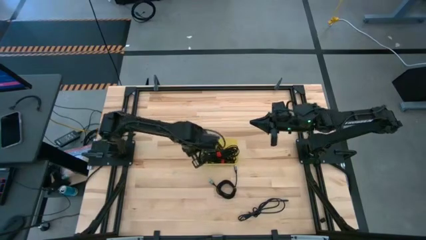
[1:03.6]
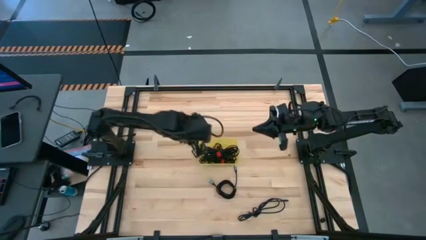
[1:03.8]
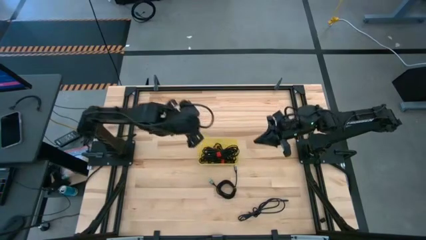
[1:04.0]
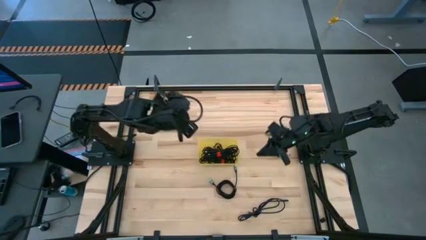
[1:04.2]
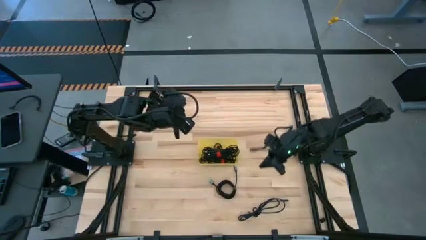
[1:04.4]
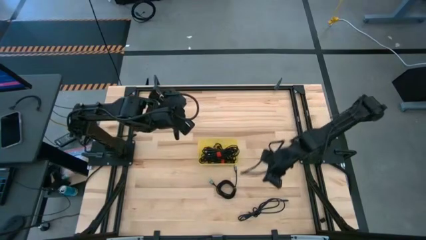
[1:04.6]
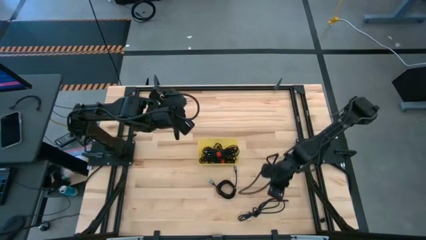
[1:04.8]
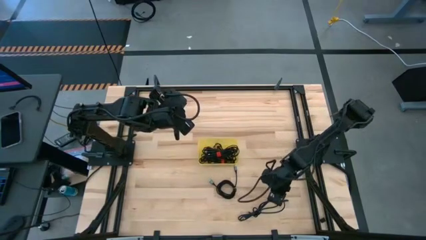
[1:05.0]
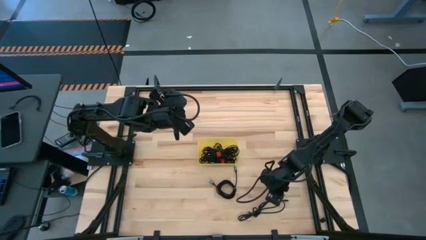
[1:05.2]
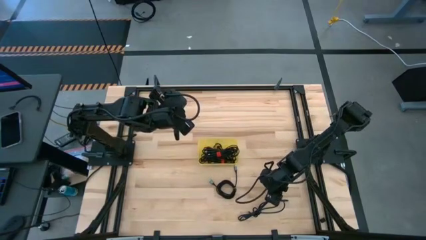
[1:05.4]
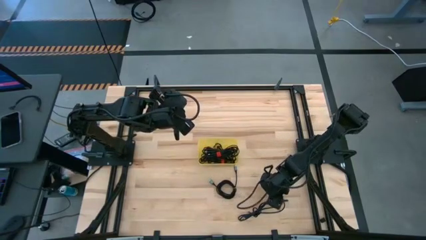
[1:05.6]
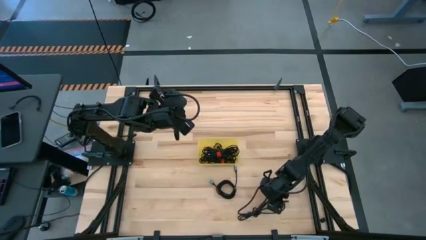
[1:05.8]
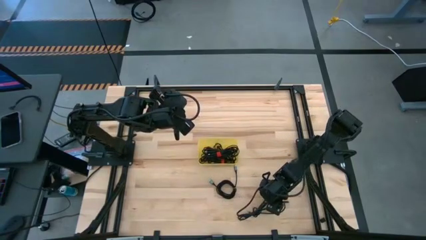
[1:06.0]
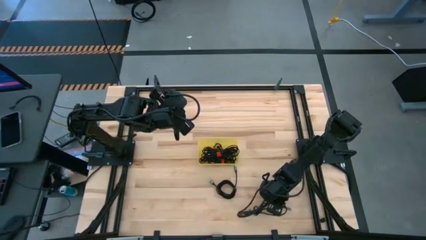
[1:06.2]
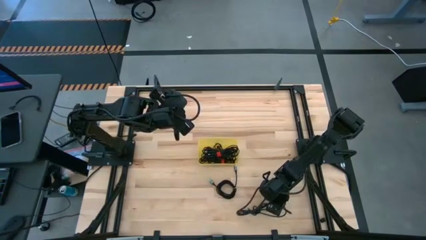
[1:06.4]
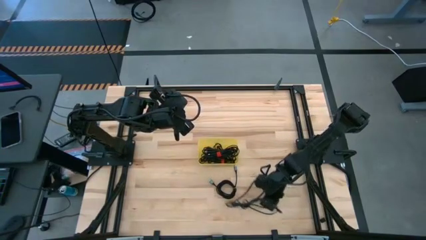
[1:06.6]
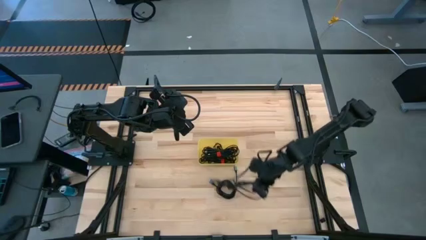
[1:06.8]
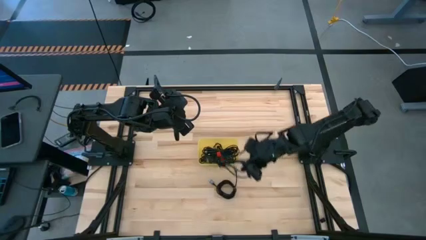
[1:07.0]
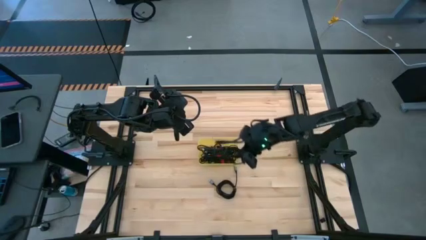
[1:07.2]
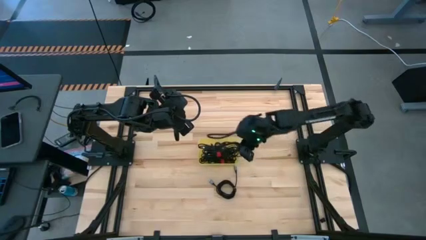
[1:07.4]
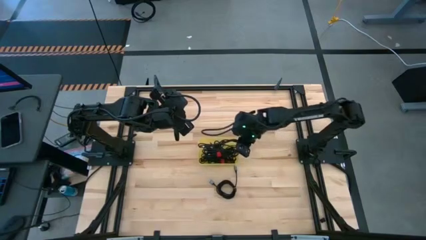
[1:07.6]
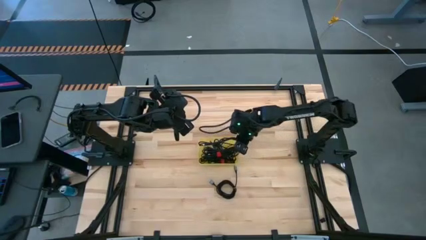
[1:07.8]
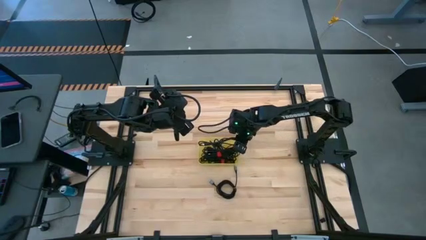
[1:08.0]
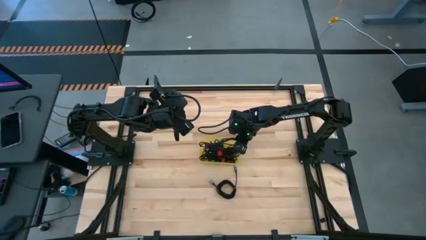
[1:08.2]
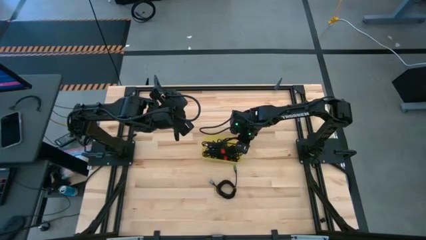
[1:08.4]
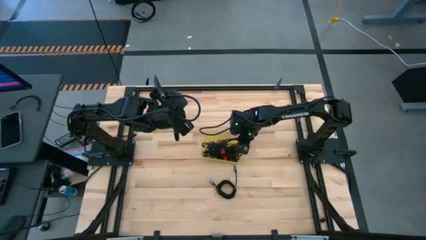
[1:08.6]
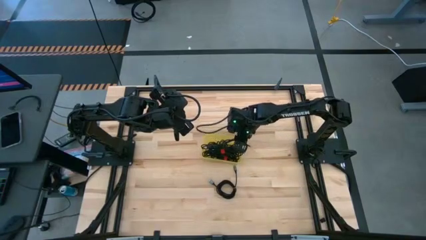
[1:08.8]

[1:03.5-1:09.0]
Task: Pick and place USB-C Cables
Put the black charger cable into the yellow bin

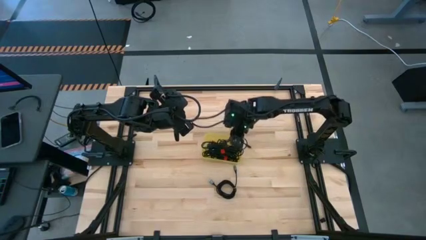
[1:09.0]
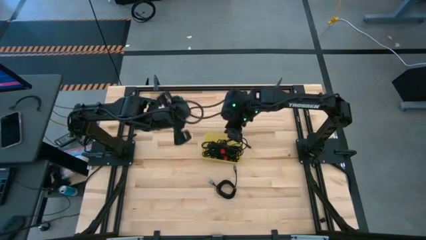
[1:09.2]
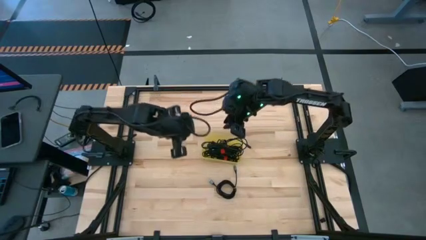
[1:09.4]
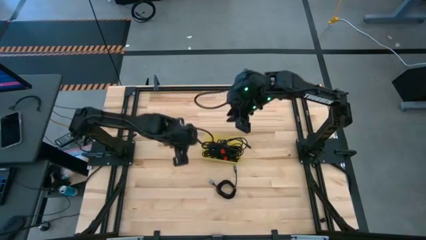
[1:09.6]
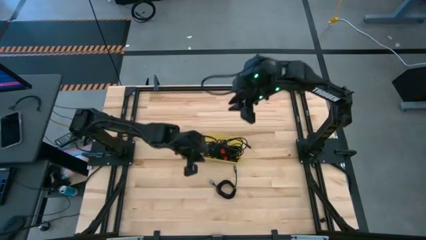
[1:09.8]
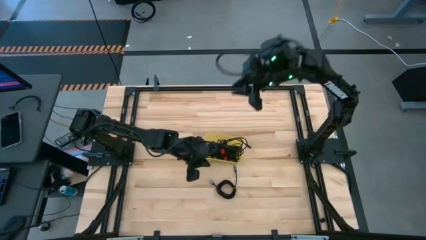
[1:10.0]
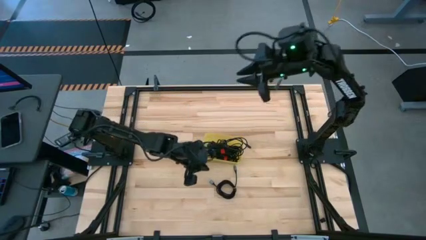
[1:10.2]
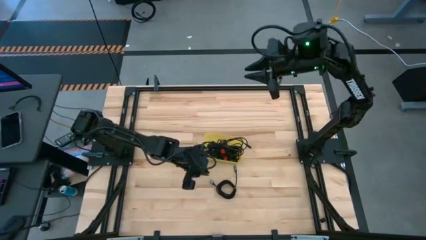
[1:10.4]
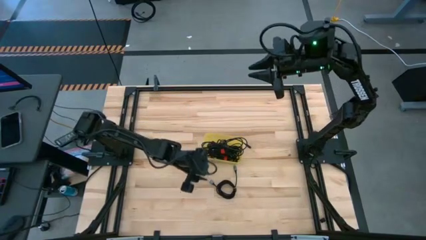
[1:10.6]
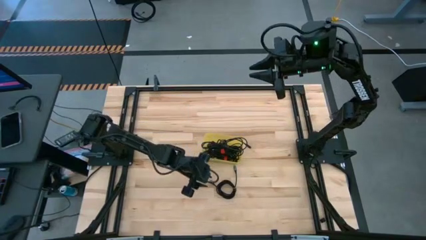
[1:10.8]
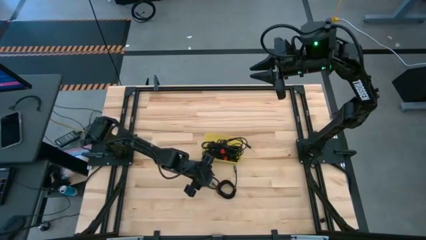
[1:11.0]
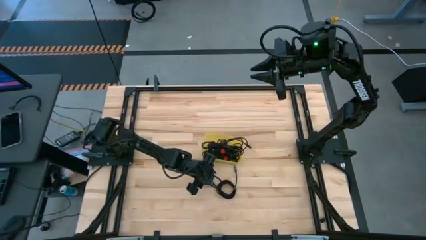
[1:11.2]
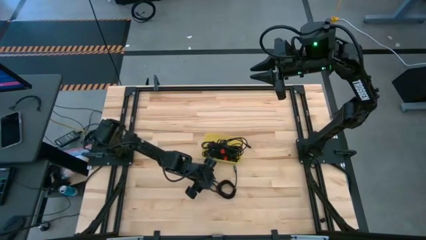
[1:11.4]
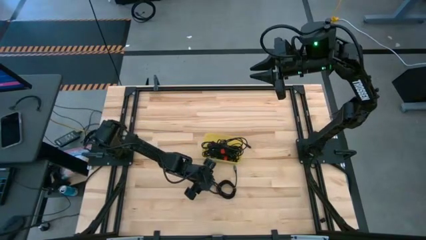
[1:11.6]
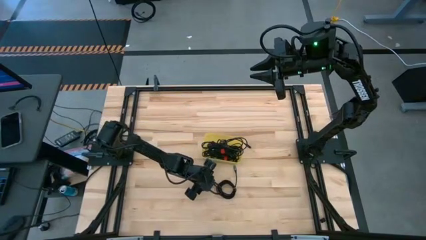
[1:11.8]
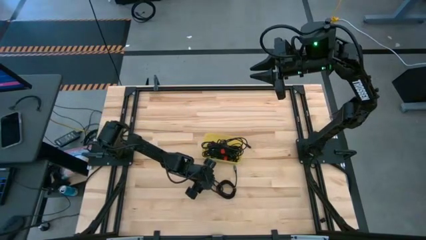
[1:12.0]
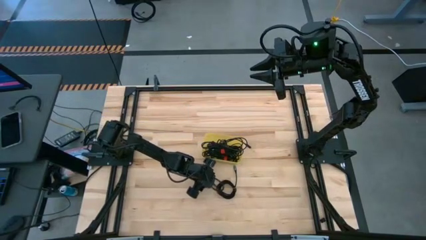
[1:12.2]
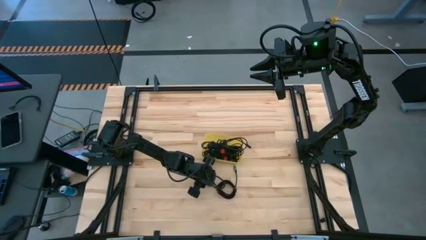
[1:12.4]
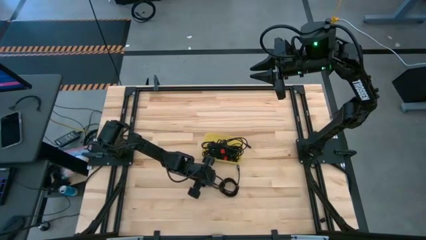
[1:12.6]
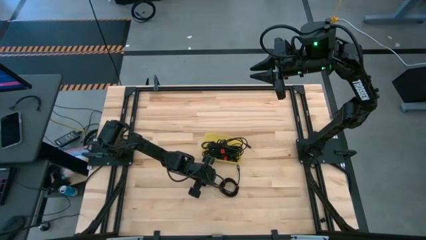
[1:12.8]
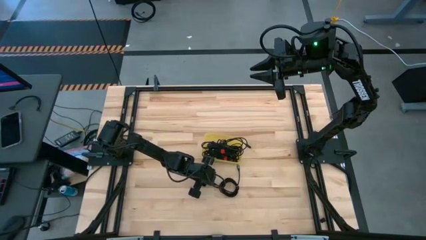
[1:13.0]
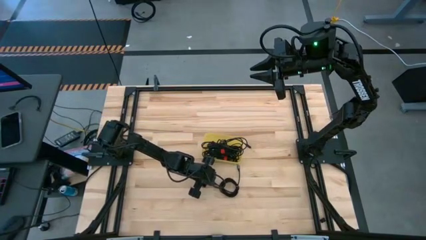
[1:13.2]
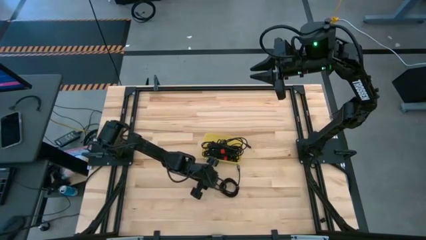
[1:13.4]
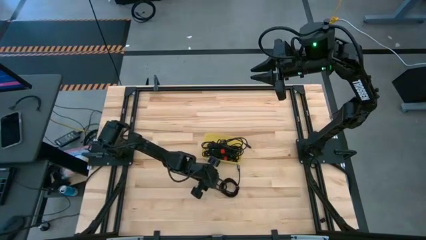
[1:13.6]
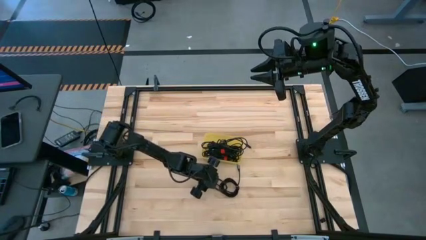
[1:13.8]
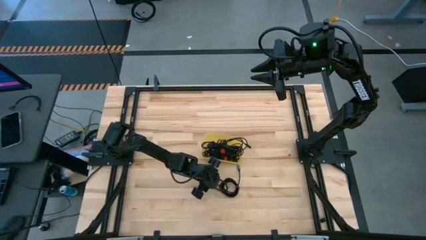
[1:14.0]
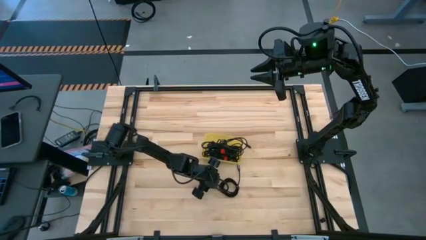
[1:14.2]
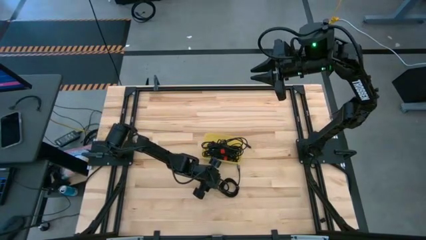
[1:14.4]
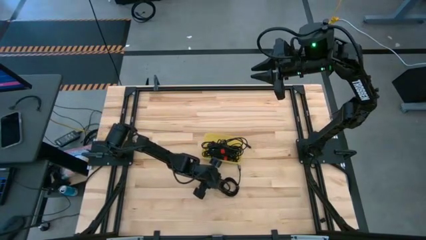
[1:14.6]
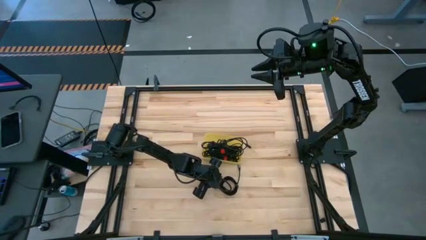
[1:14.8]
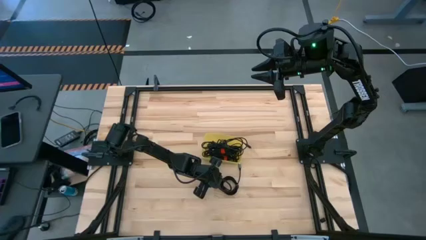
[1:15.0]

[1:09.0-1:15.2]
Put the black charger cable into the yellow bin

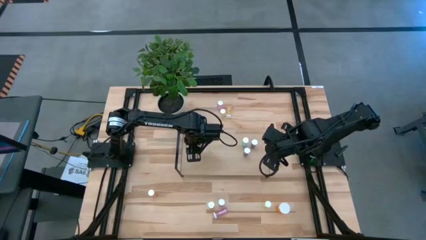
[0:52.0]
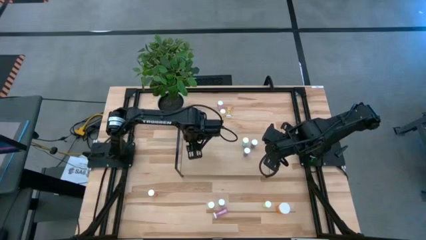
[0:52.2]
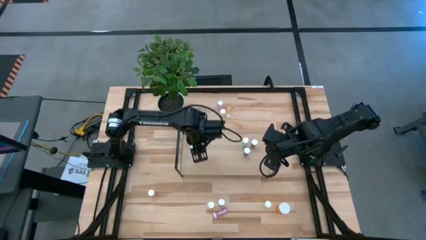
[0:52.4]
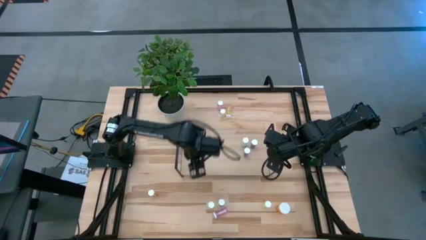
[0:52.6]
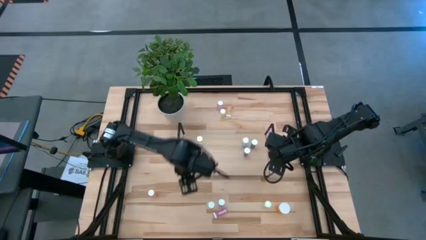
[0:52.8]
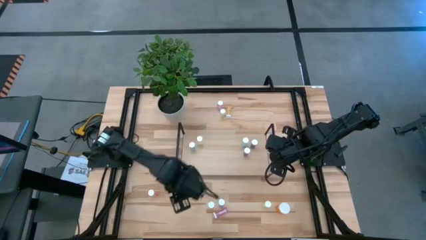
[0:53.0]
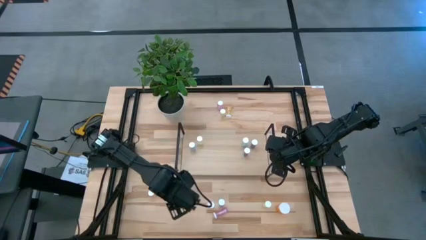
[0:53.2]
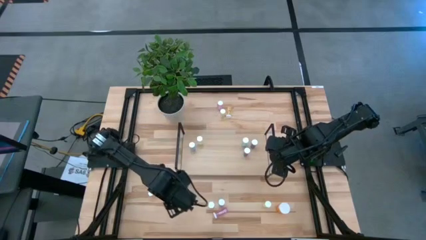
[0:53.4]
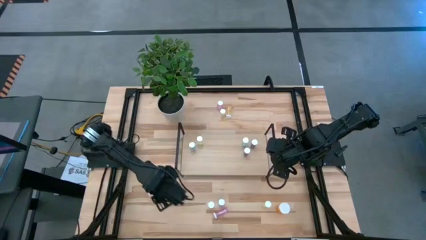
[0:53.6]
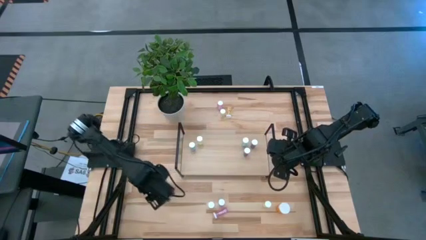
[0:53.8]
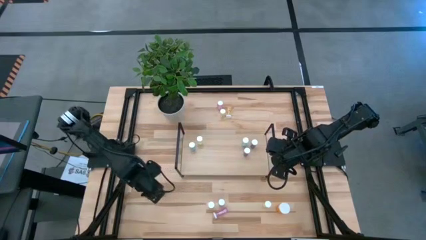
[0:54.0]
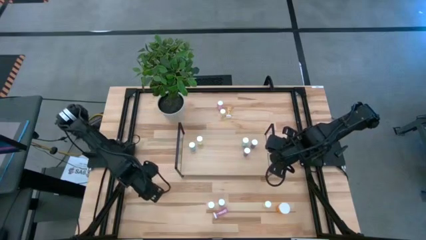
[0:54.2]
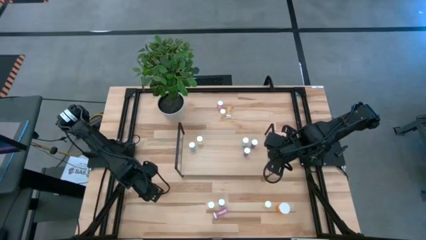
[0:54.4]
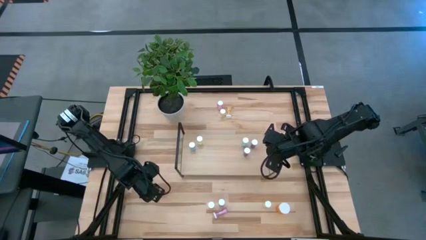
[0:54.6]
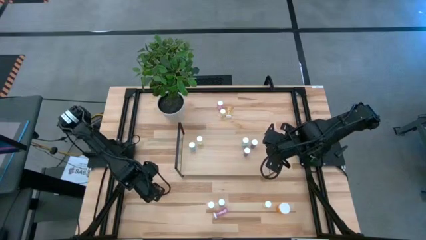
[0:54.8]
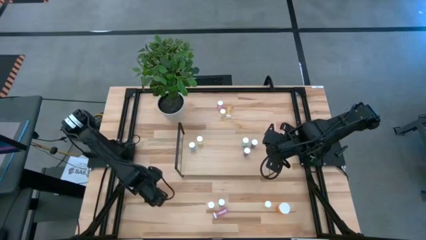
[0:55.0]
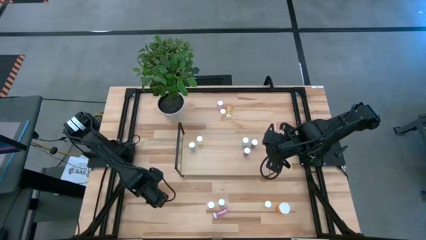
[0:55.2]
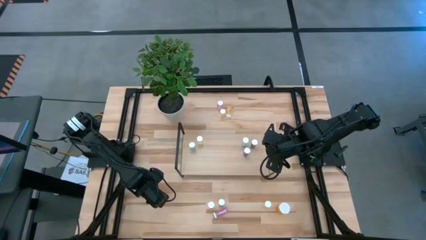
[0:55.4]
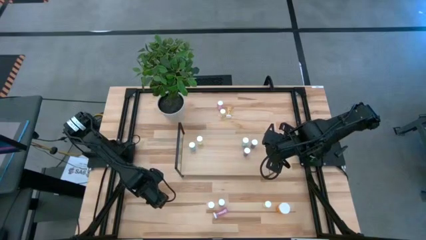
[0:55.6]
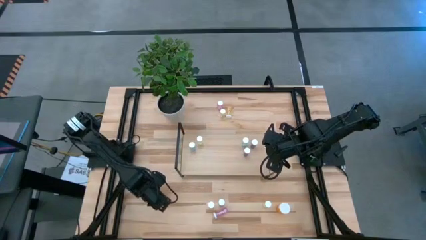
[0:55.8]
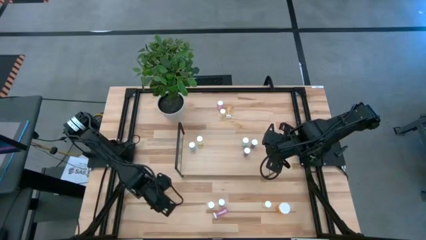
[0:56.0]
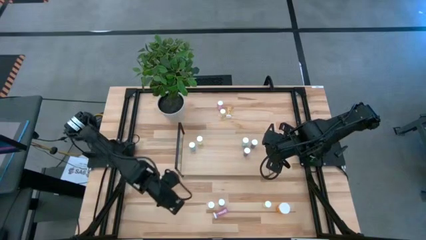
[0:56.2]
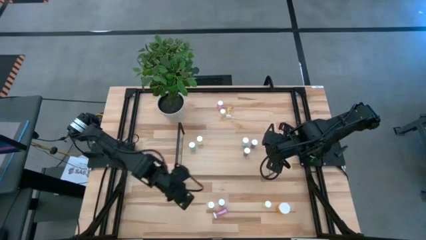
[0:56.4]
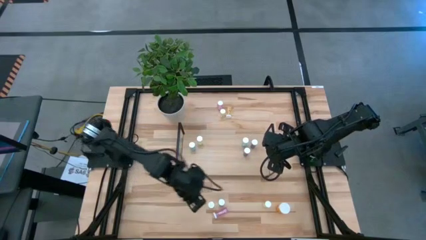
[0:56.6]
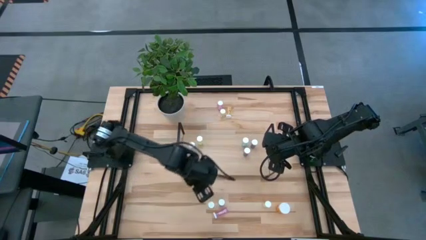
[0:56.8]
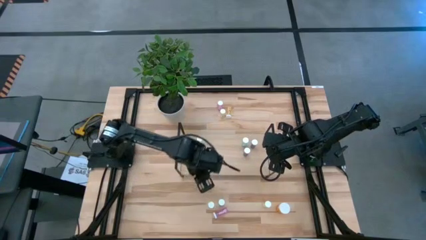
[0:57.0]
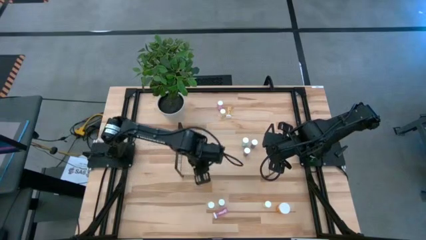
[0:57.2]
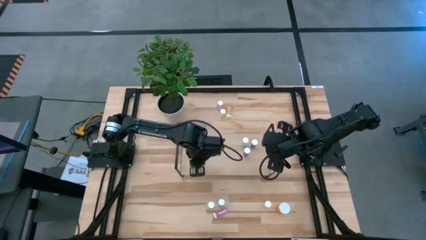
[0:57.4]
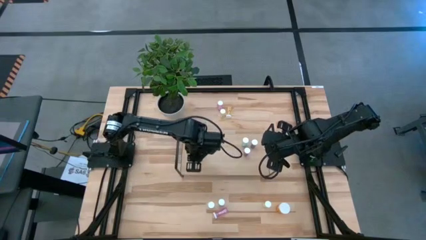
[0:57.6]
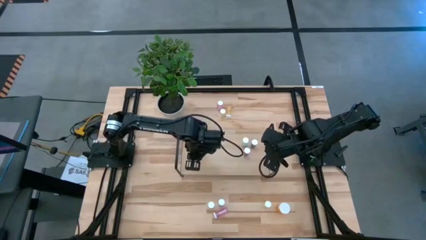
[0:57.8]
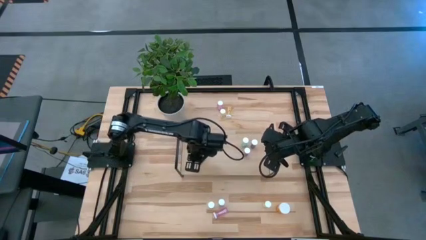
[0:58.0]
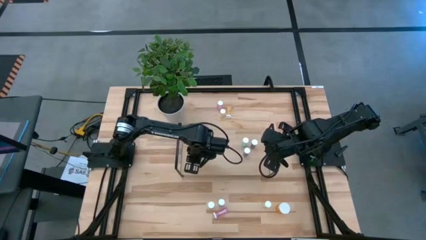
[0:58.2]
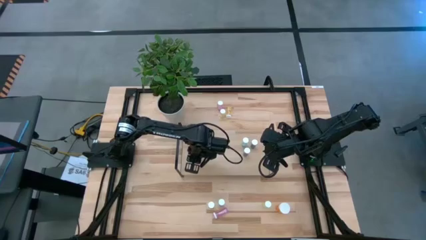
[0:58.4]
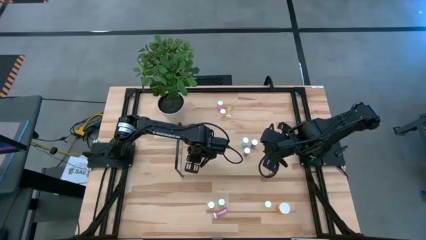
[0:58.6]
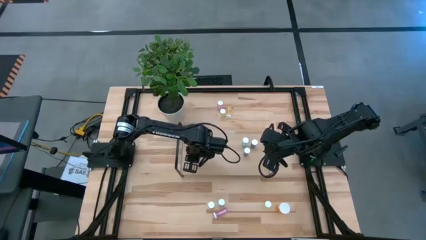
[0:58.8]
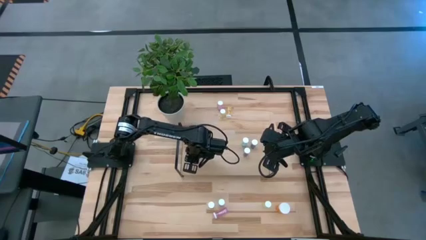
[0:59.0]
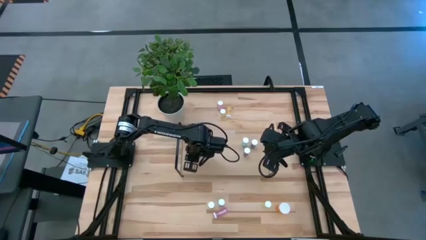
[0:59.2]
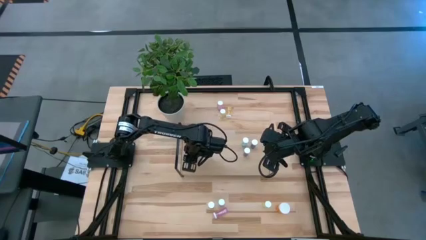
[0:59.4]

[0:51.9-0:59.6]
Task: Pick and place medicine bottles onto shelf by color
Put the orange pill bottle on the shelf
